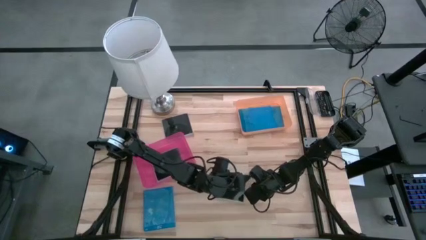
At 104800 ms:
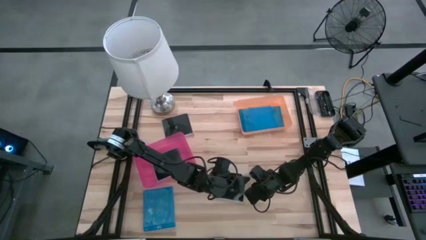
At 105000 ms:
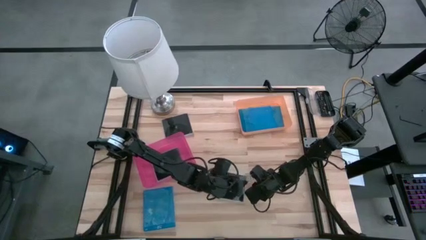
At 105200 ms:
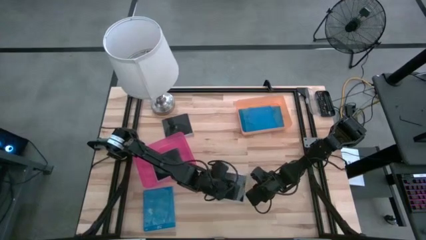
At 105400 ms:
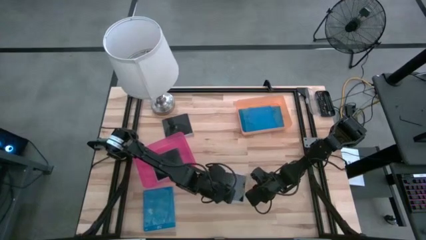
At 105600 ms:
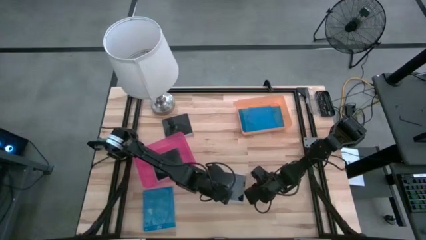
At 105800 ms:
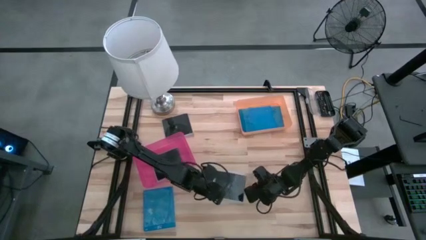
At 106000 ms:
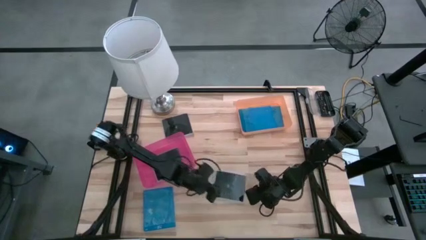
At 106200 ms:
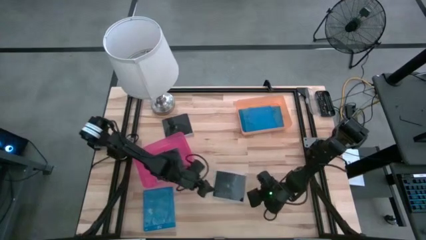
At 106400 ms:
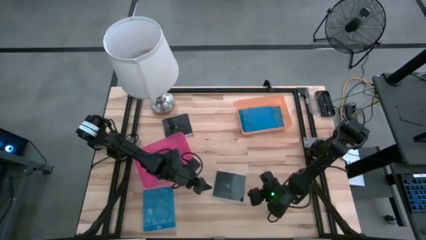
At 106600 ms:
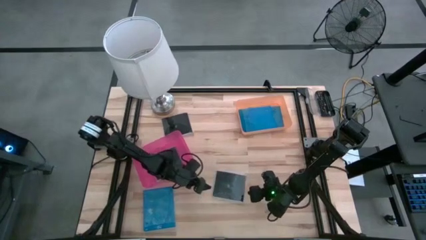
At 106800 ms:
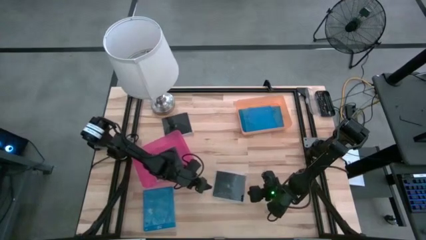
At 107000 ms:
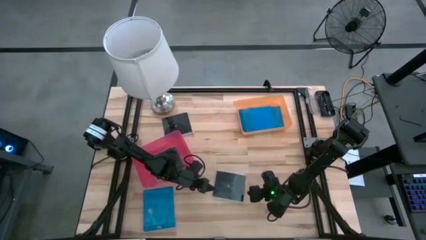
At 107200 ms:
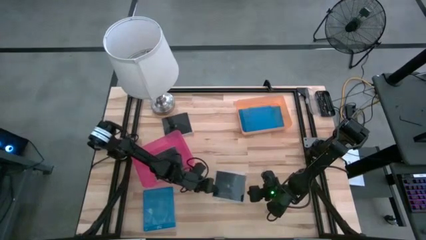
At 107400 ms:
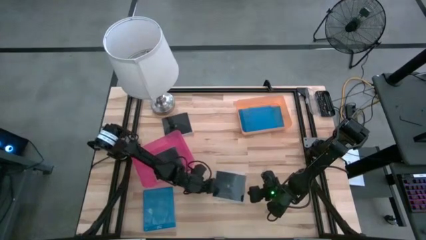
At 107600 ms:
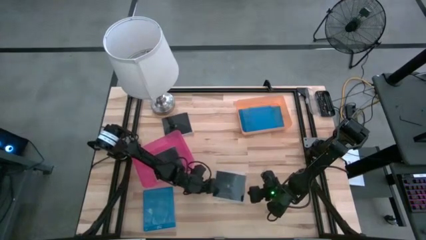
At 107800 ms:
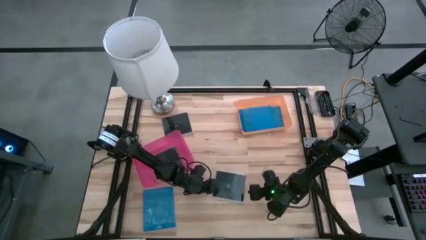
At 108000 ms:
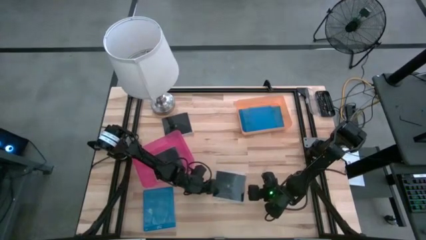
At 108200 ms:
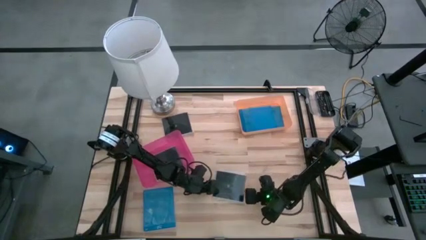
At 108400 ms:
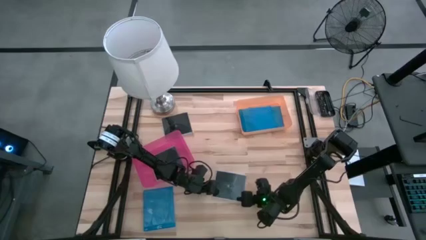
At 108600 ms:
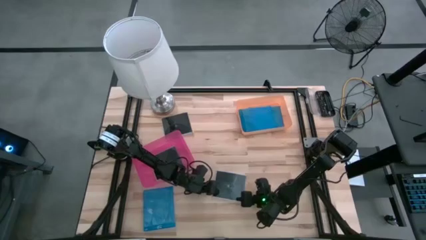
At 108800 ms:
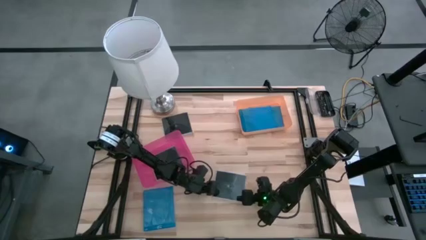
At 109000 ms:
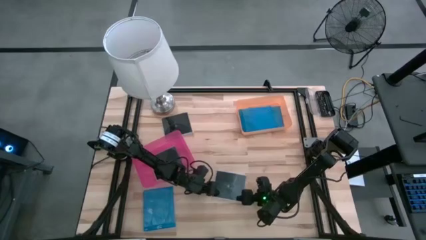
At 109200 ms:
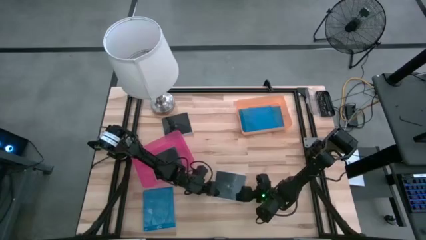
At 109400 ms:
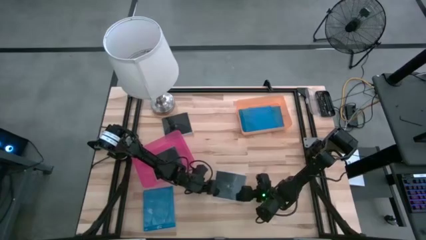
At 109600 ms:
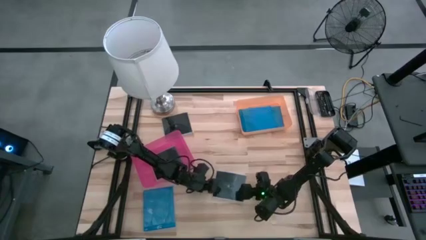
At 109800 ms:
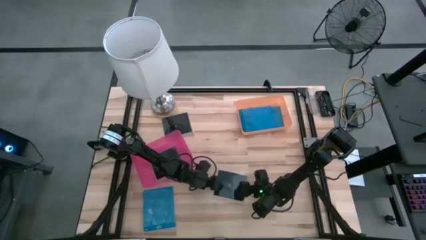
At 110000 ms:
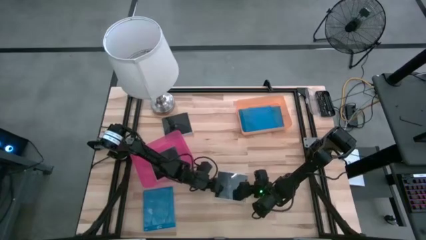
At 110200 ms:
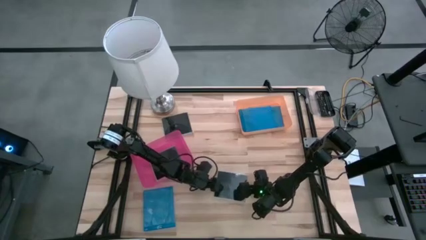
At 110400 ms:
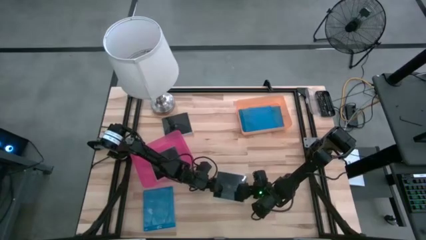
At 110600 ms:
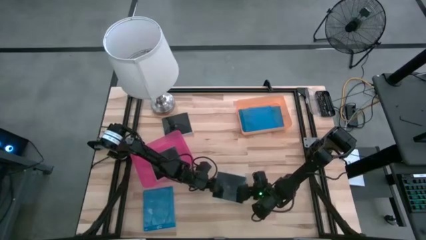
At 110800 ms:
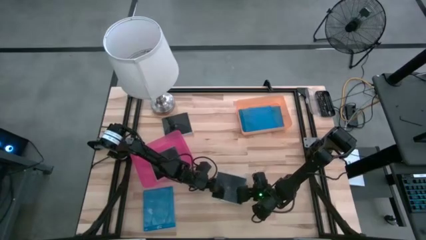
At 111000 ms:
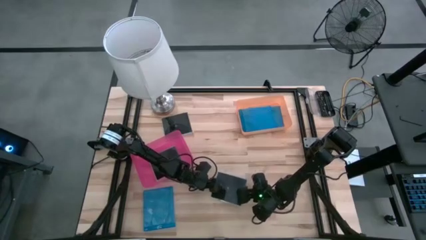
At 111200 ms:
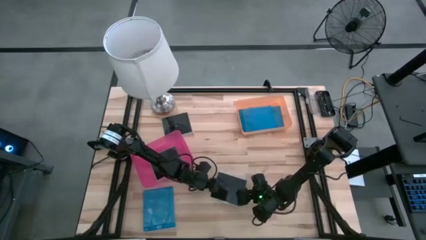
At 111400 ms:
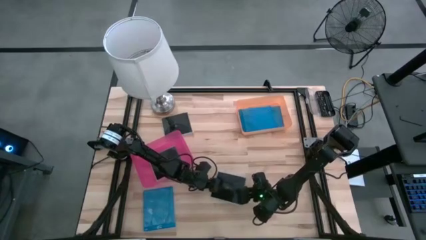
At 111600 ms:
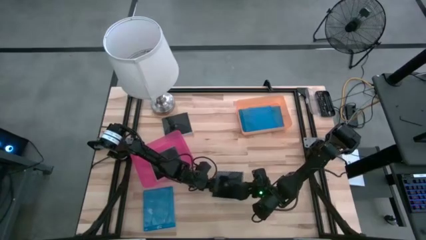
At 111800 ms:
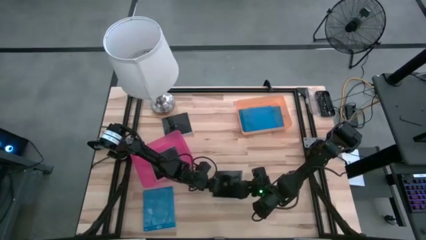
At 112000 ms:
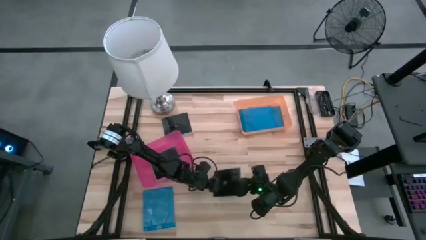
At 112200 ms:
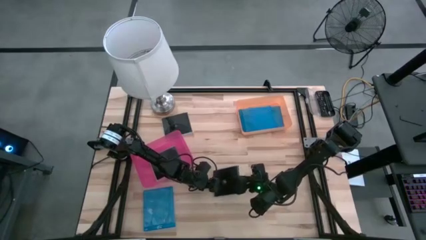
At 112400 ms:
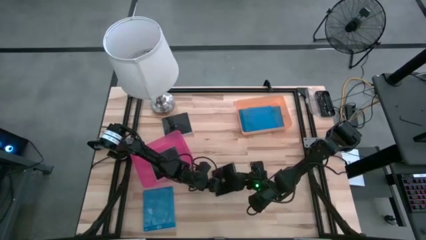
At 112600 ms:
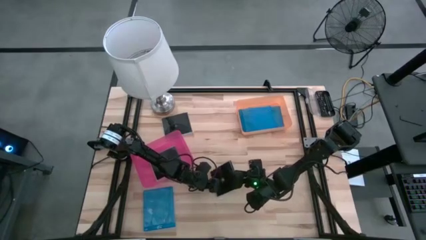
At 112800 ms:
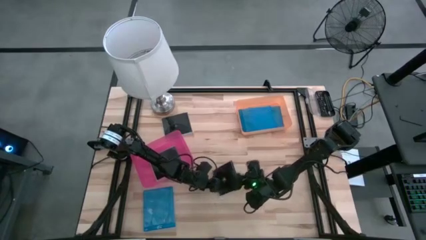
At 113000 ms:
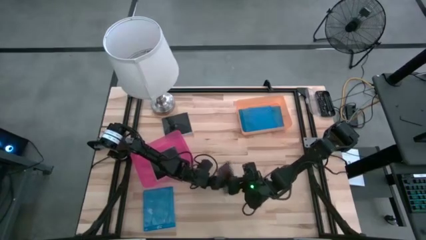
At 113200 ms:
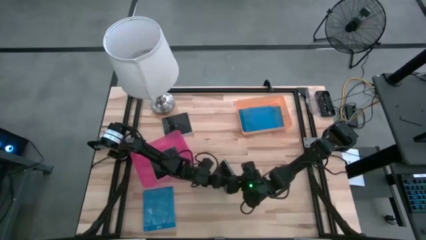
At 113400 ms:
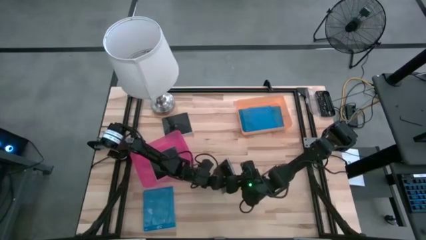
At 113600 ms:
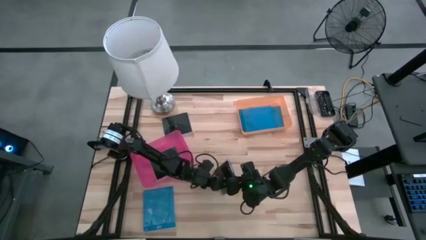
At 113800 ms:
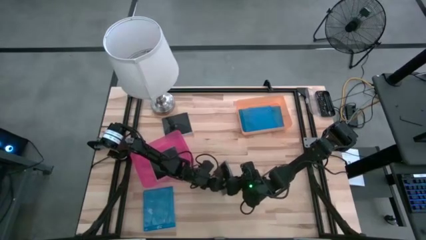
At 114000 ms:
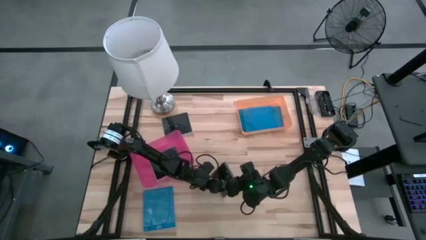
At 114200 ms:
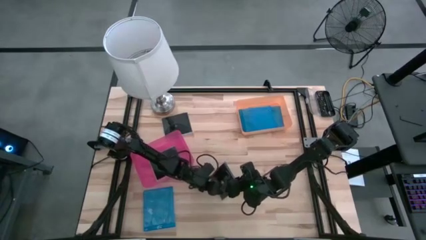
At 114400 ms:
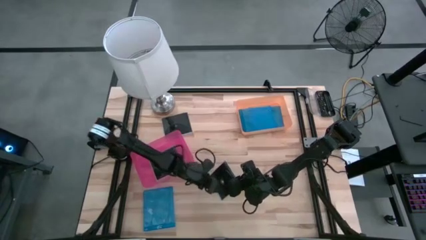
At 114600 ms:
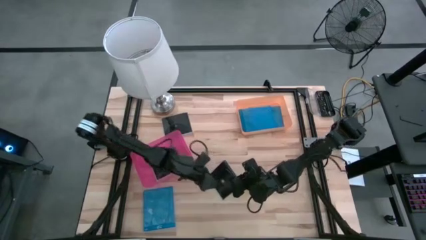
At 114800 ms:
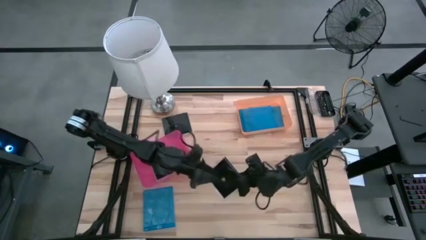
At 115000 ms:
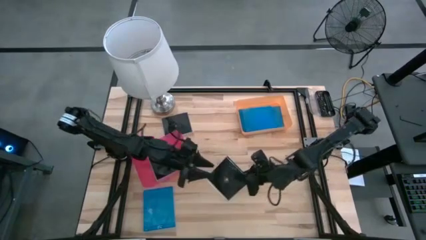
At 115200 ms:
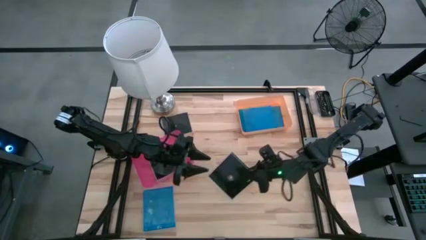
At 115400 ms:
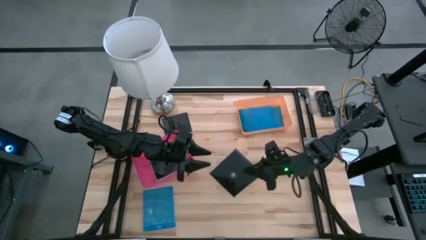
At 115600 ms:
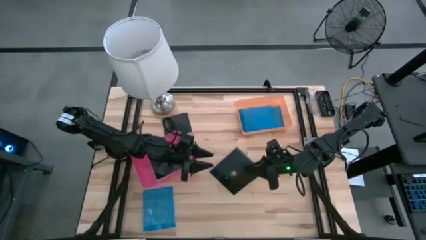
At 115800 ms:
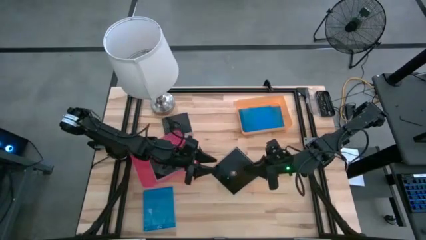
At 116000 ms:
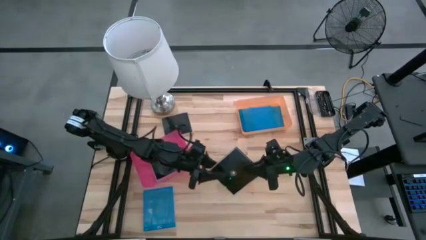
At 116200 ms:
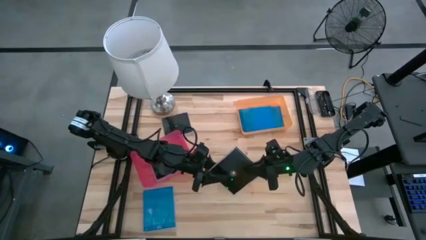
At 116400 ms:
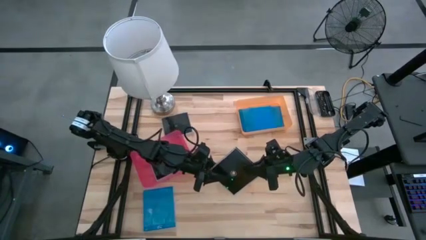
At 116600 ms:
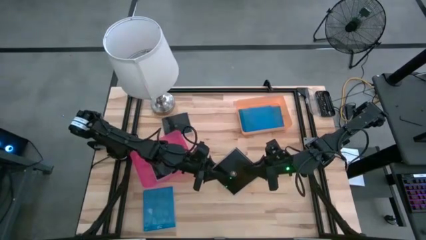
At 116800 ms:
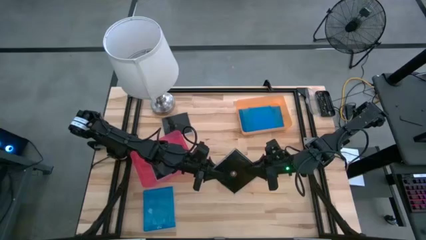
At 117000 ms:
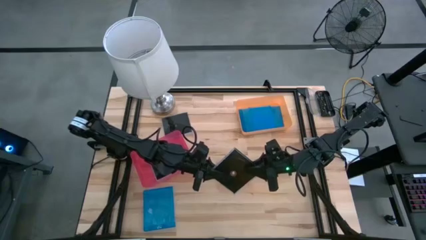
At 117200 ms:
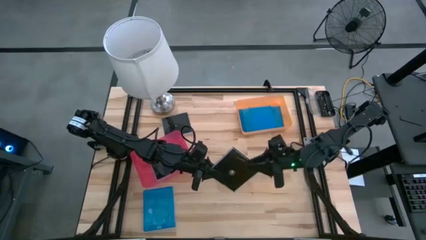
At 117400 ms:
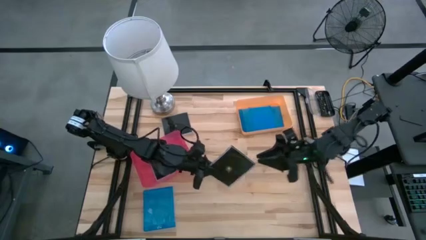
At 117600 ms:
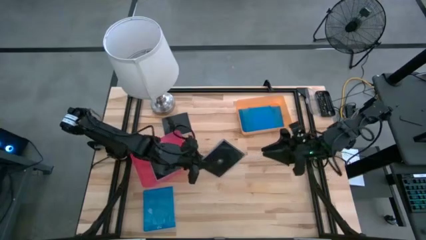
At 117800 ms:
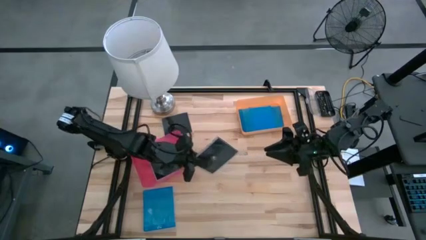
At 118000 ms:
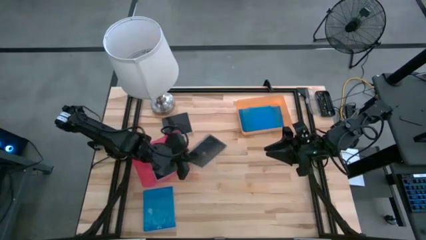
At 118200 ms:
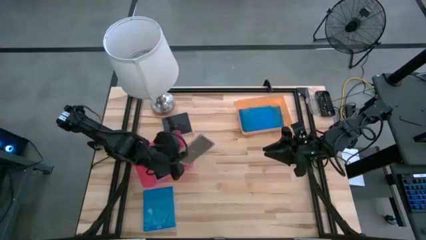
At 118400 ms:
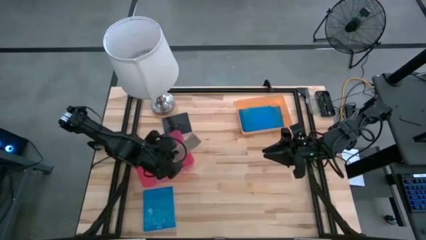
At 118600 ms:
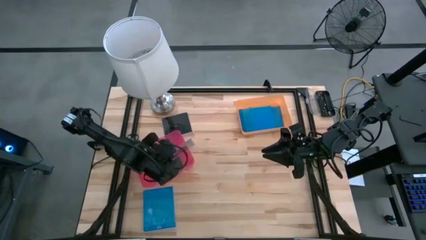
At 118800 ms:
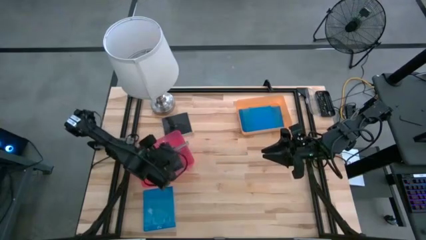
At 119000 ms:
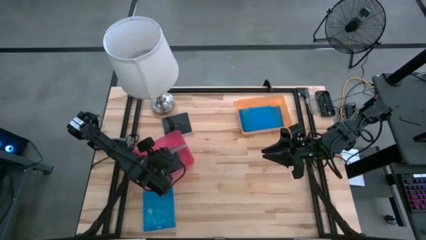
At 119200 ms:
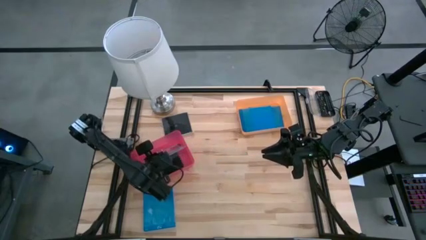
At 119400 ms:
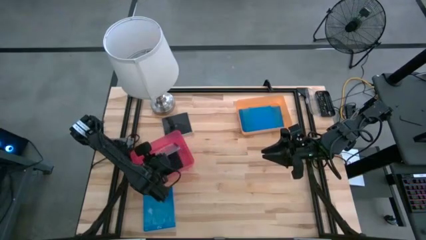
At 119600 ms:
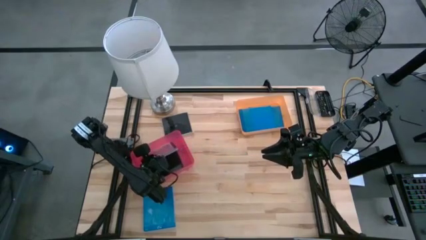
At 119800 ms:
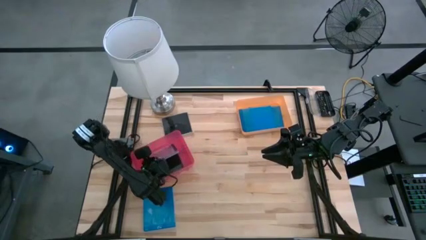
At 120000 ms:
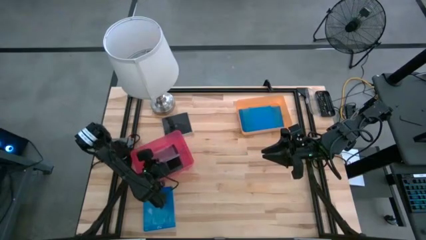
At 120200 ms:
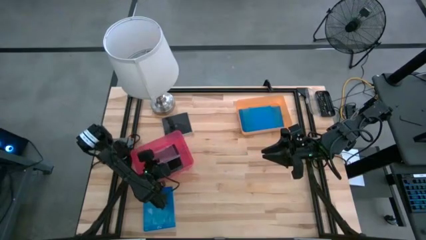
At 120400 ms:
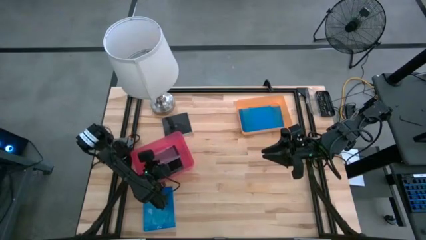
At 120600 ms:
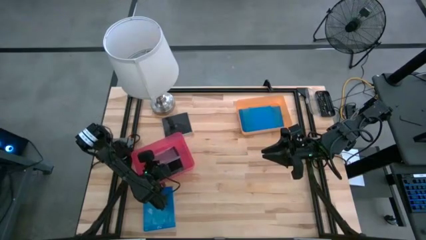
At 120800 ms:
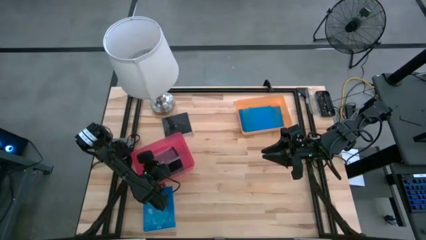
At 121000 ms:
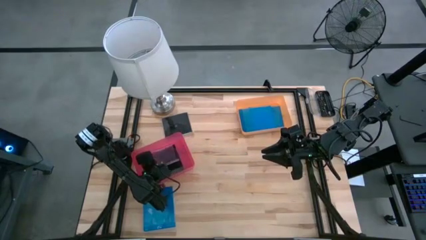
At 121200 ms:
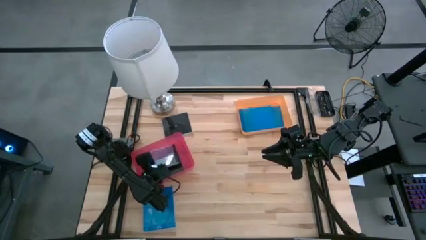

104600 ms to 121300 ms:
Task: Pick & place jewel cases by type
Put the bottom black CD case into the pink bin
